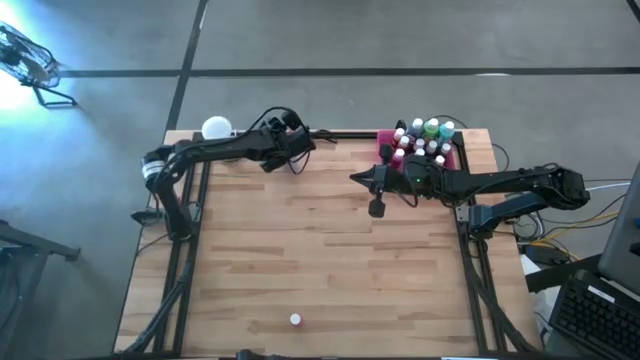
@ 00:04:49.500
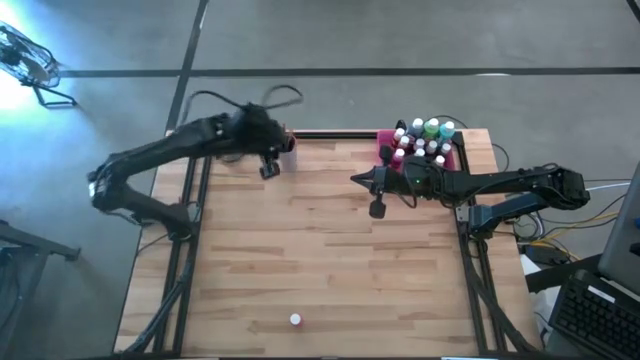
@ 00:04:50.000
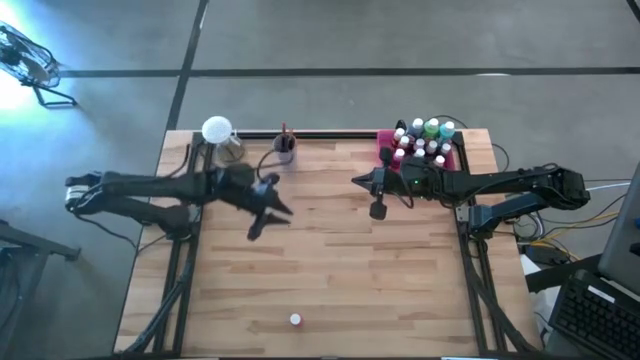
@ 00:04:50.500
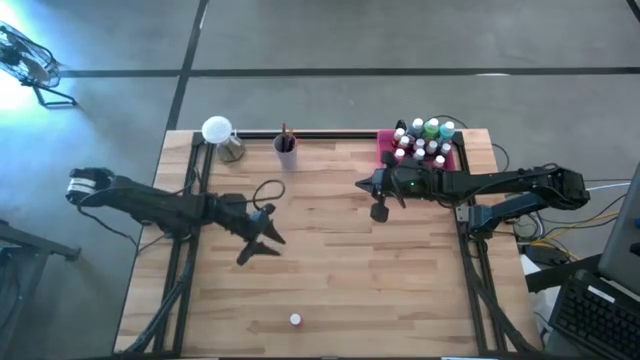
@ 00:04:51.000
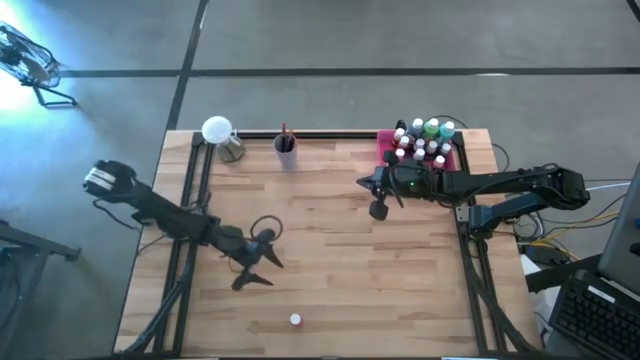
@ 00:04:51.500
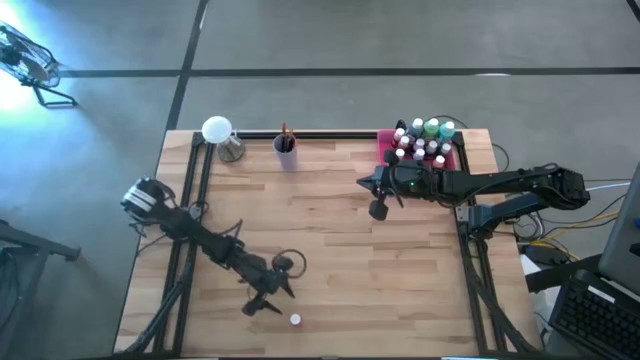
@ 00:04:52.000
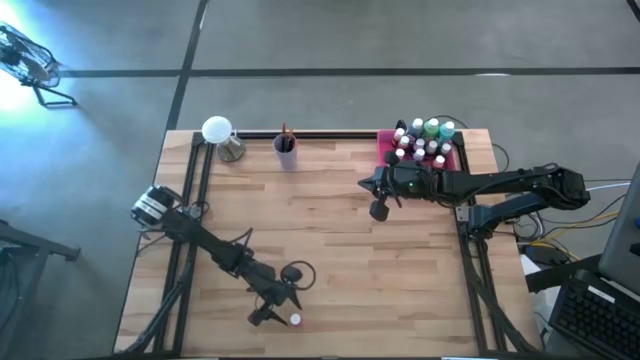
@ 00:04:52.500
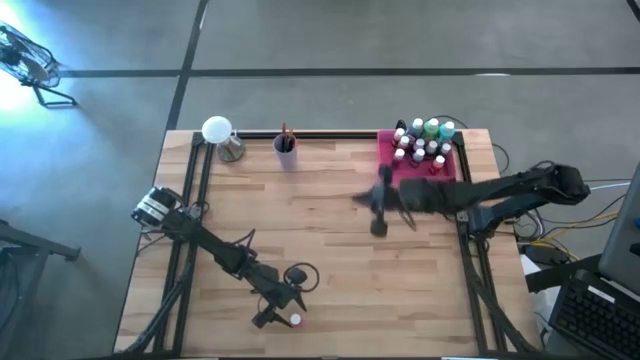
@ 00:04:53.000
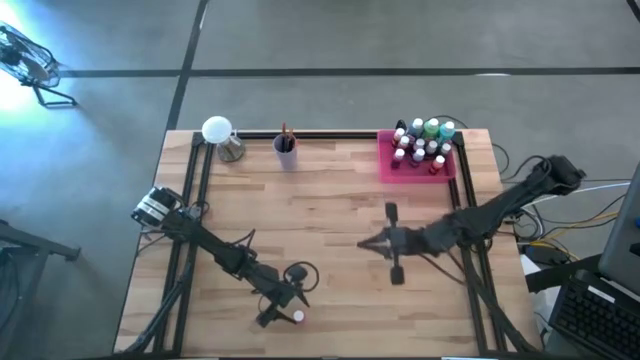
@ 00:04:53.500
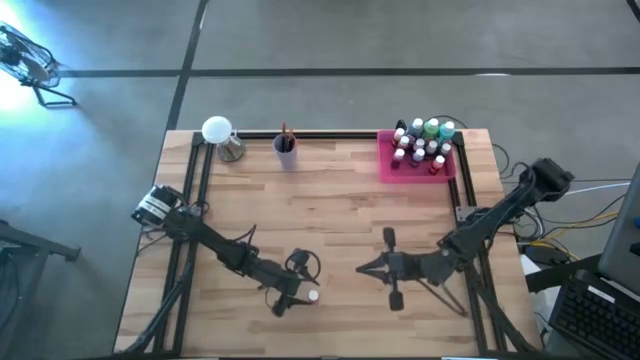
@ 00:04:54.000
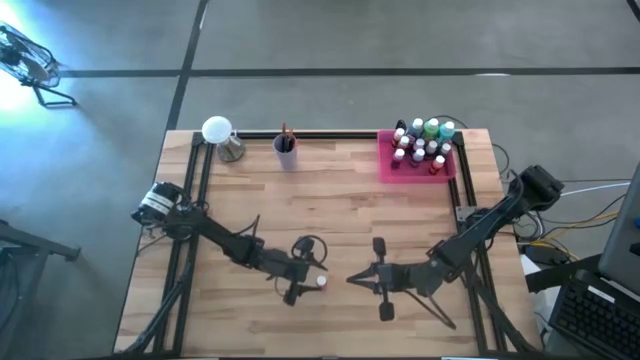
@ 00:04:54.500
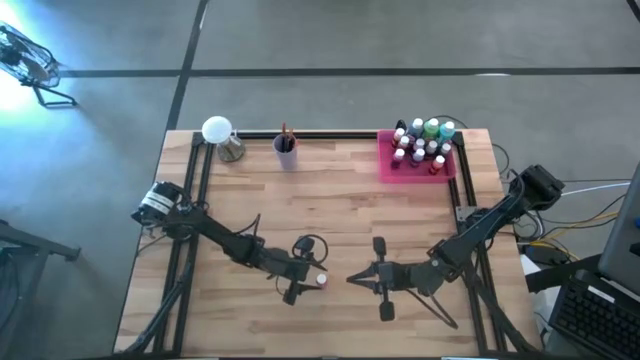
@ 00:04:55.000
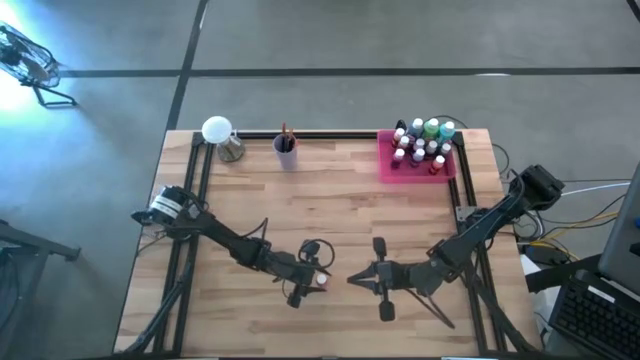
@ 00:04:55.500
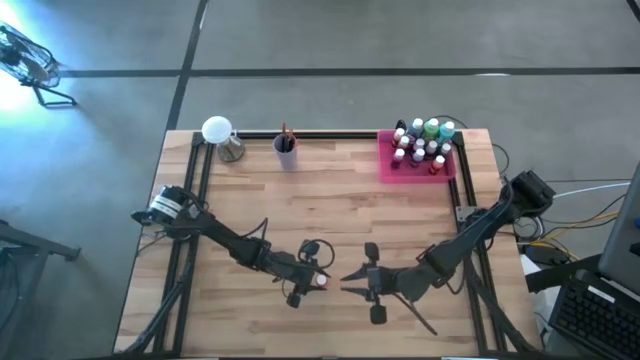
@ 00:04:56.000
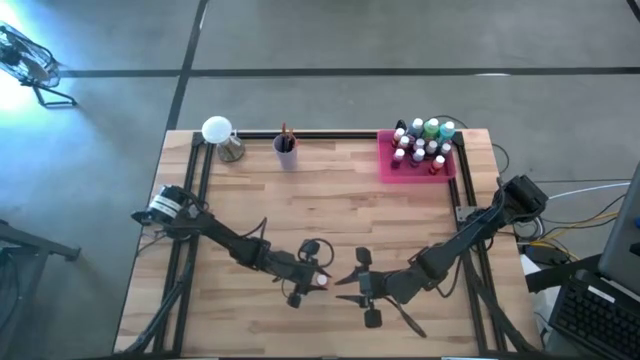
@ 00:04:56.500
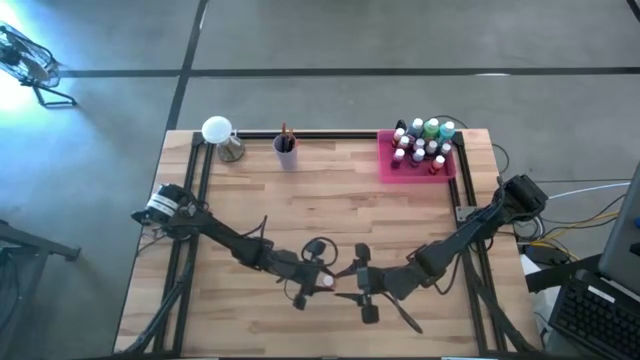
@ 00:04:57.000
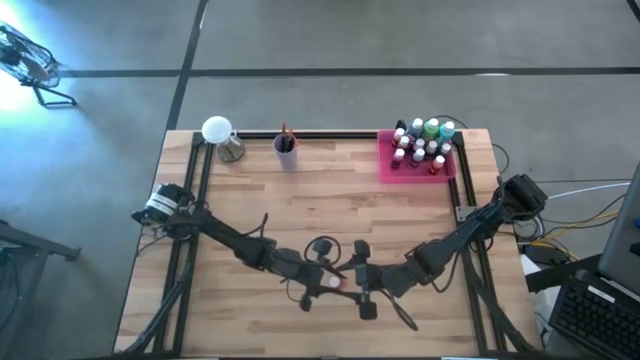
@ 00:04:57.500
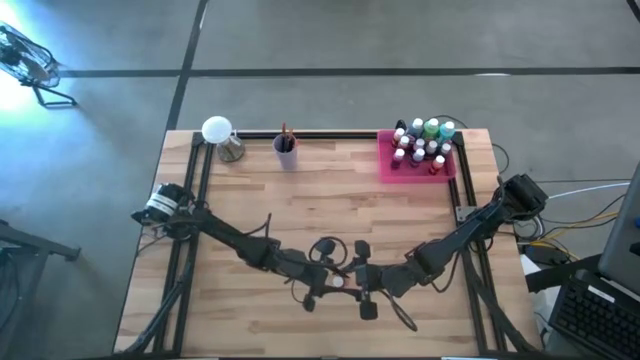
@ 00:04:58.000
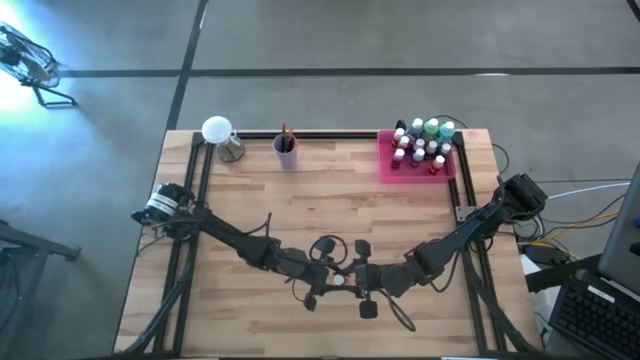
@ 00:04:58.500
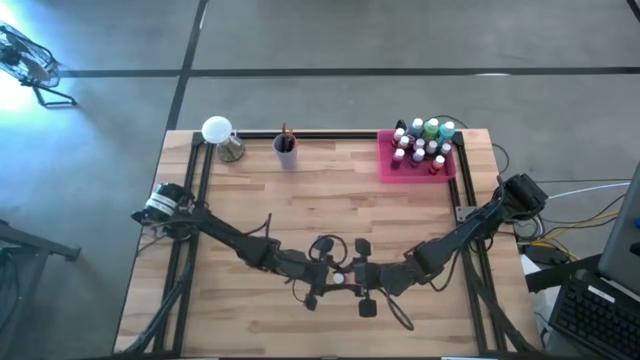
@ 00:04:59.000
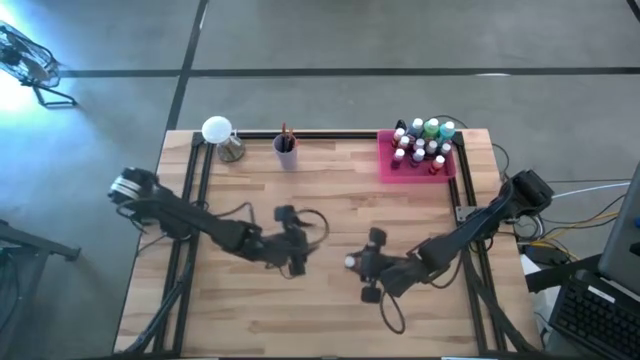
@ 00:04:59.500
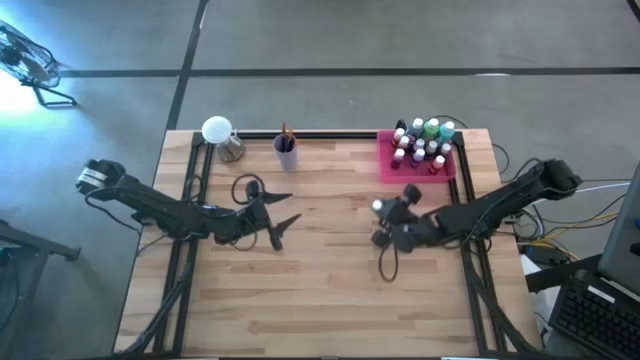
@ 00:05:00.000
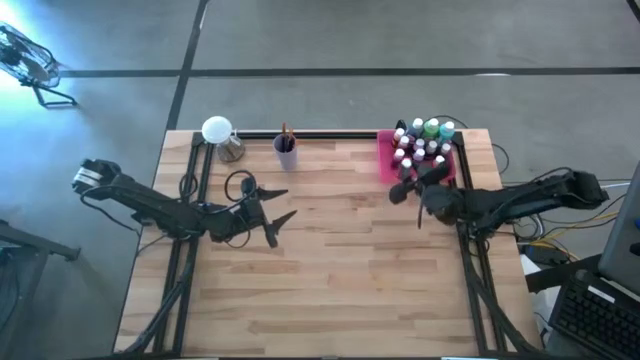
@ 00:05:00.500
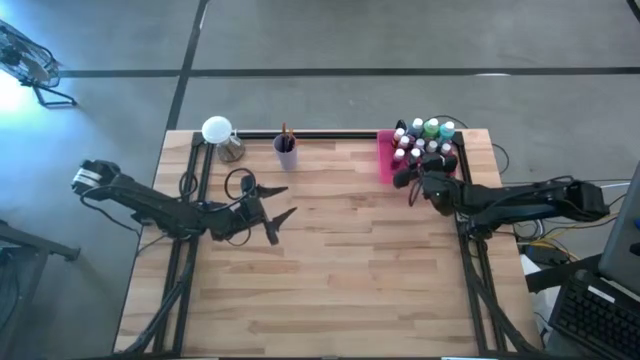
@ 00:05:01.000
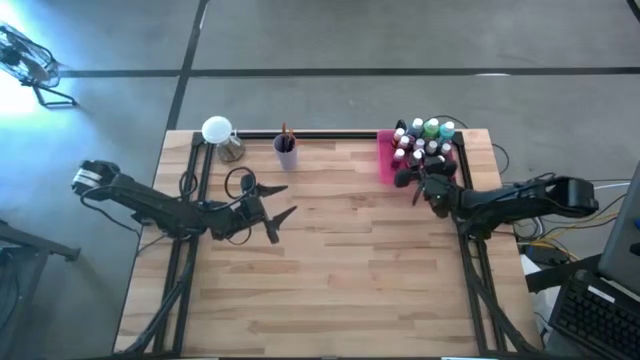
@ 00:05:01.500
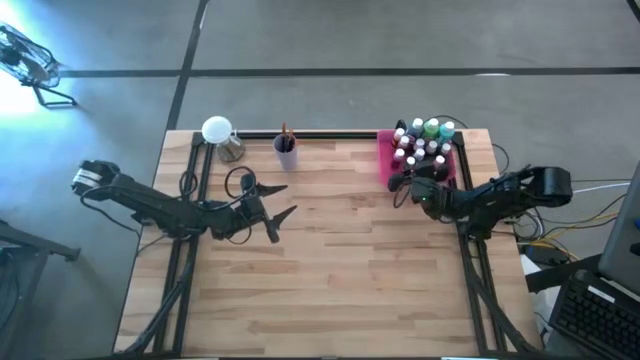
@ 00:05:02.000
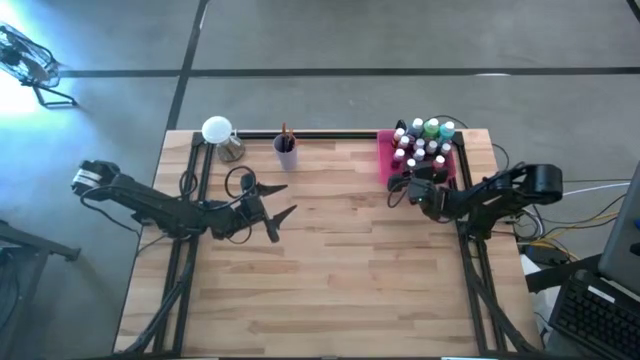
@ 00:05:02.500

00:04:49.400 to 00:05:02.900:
Task: Pick & Place Paint Supplies
Put the dark orange paint bottle into the pink bin

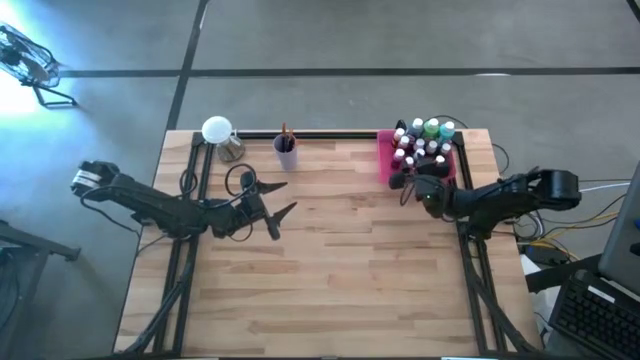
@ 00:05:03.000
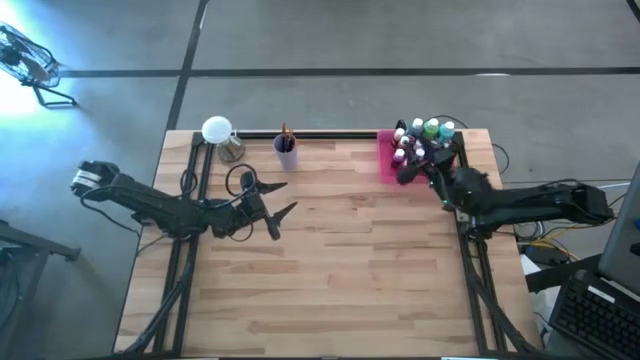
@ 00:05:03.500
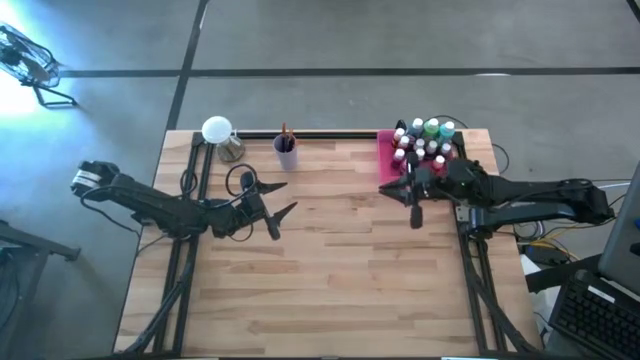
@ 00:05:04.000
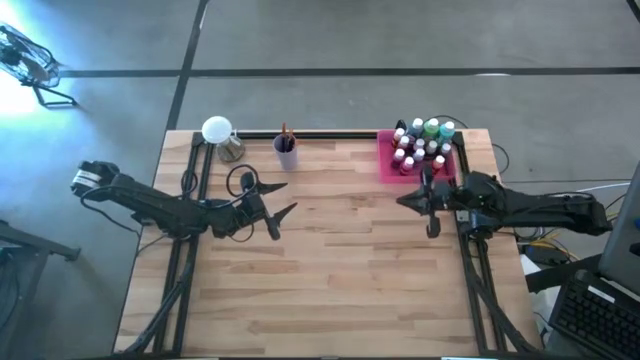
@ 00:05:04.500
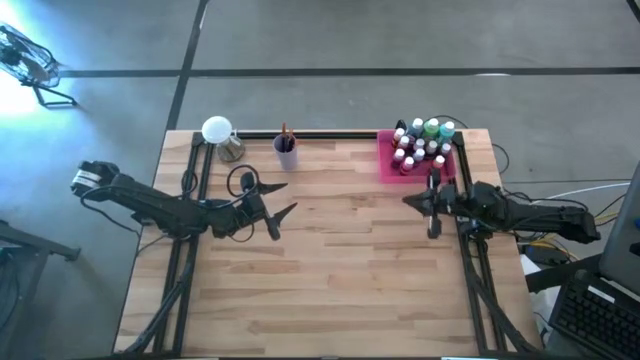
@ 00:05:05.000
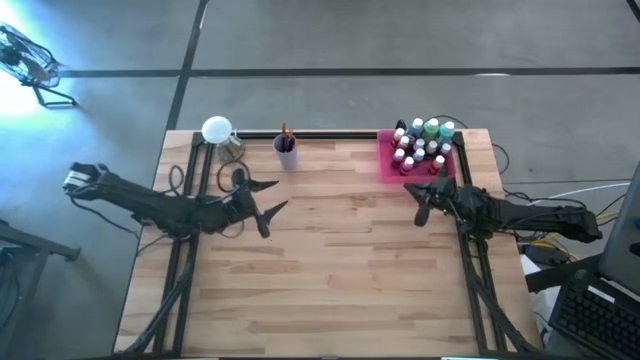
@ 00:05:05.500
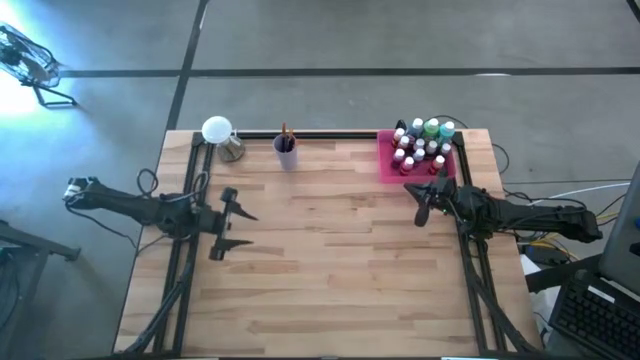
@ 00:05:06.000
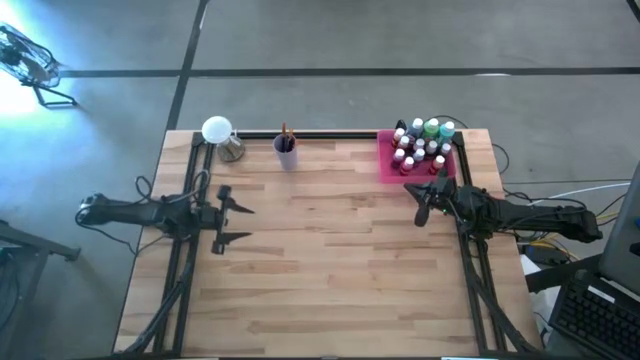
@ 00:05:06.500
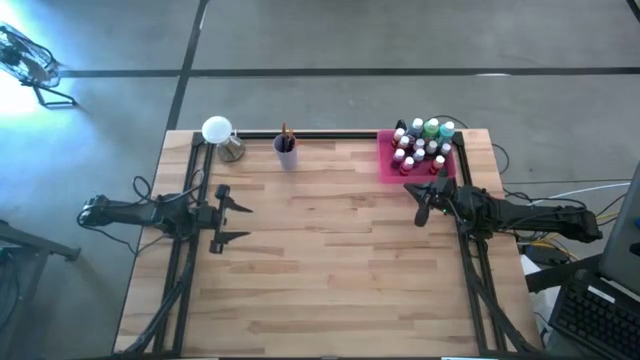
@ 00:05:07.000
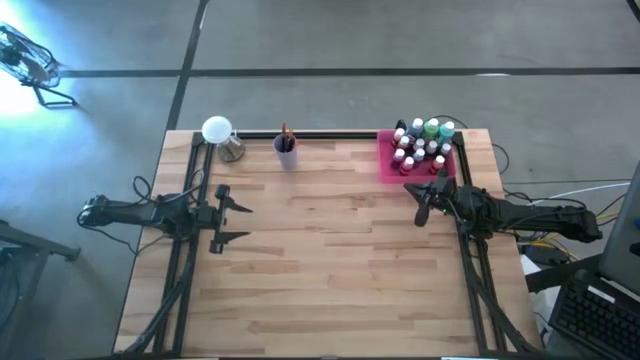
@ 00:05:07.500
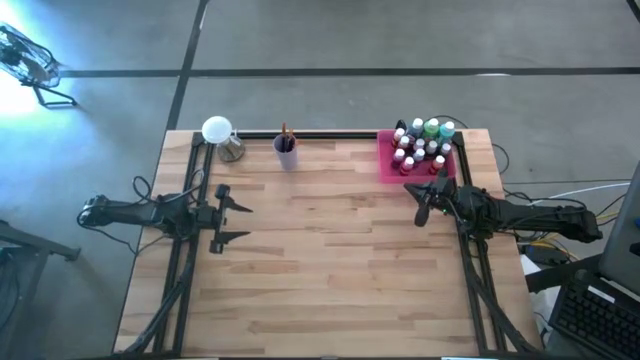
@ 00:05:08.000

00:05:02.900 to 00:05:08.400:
Return to Home Position

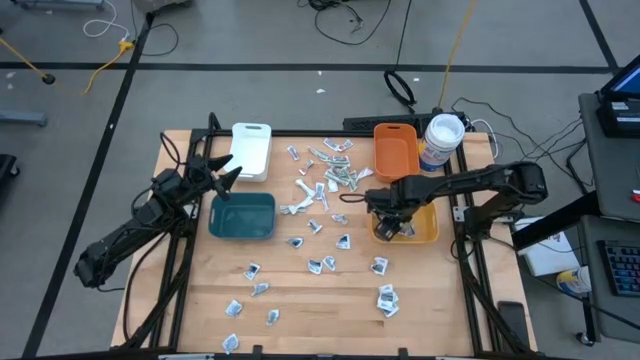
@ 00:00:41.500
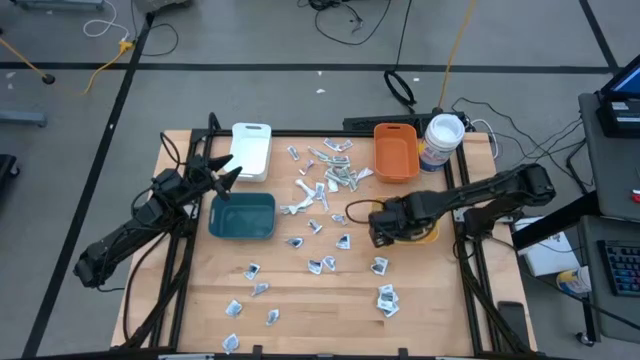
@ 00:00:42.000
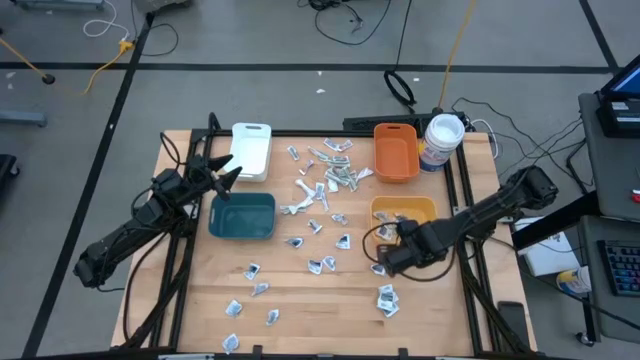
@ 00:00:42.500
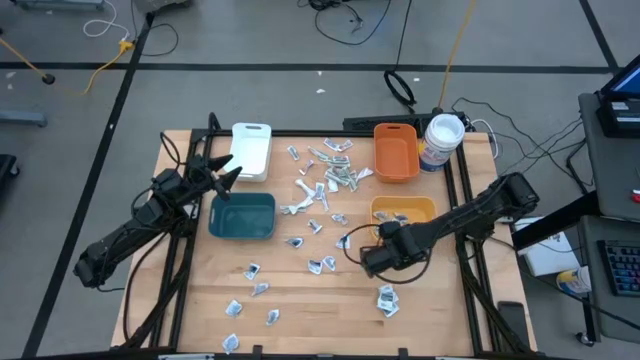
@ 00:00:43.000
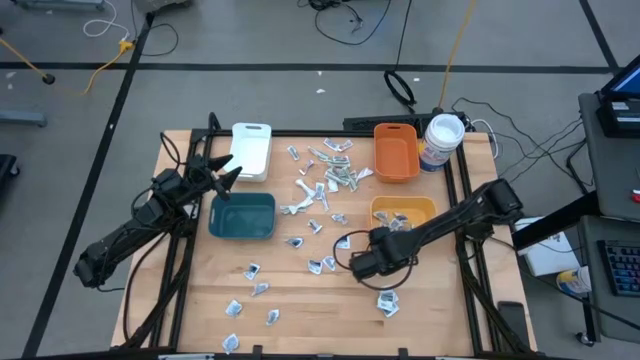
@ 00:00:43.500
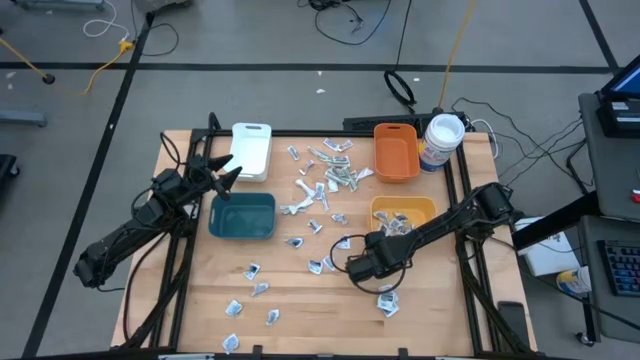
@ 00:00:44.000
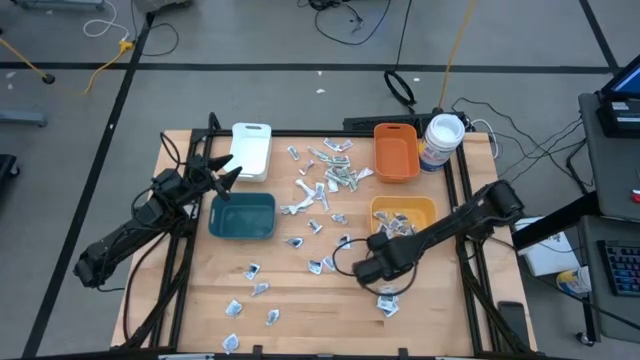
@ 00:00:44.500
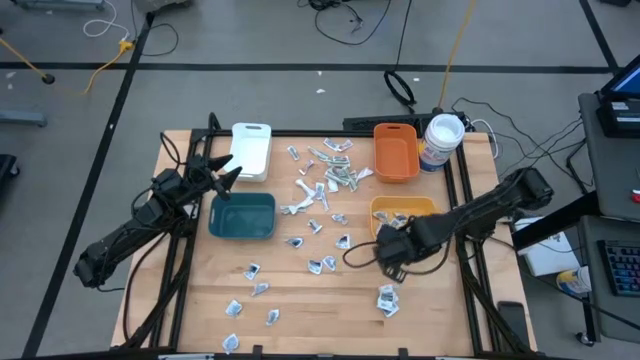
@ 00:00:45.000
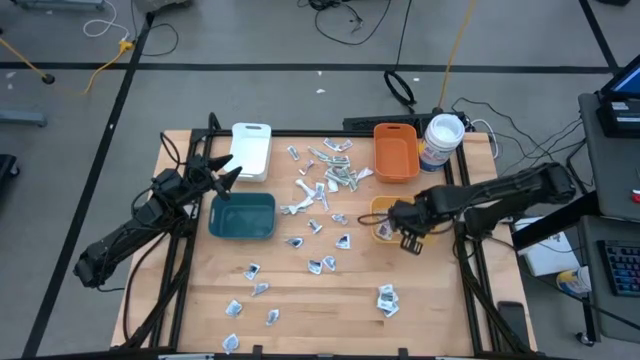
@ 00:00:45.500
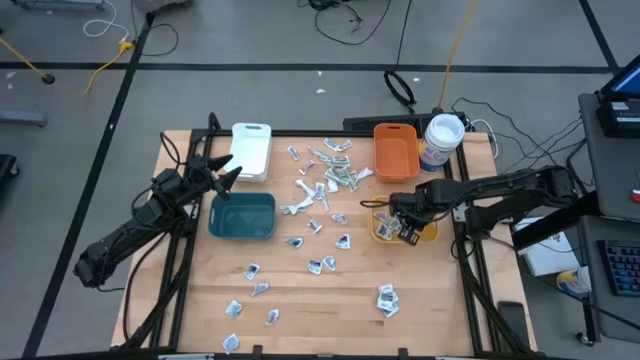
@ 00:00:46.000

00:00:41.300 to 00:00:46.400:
Task: Pick & Place First Aid Supplies
Put the antiseptic towelette into the yellow bin
